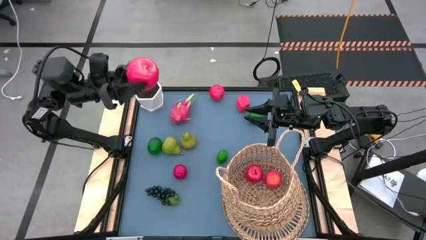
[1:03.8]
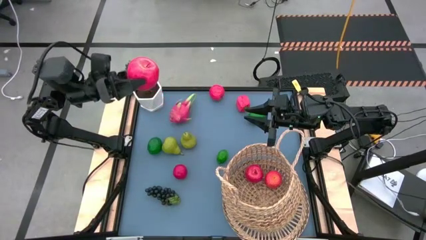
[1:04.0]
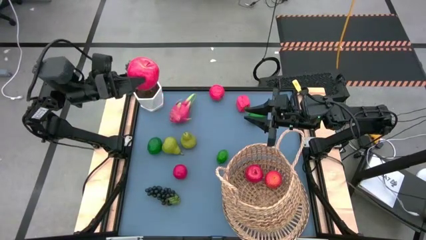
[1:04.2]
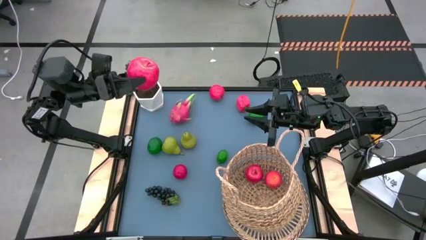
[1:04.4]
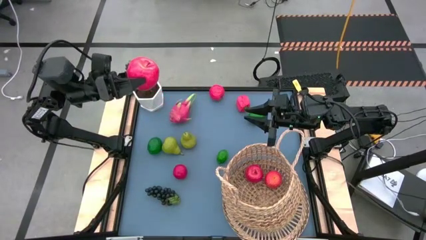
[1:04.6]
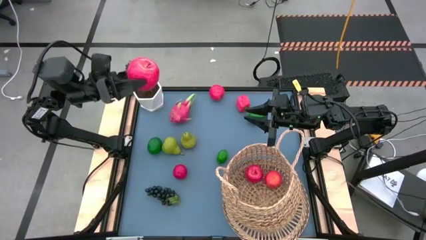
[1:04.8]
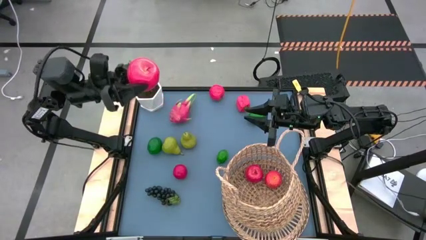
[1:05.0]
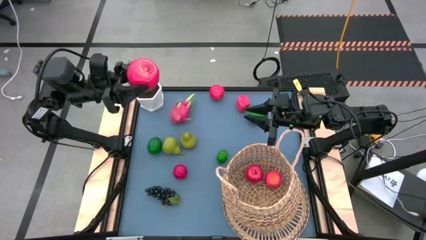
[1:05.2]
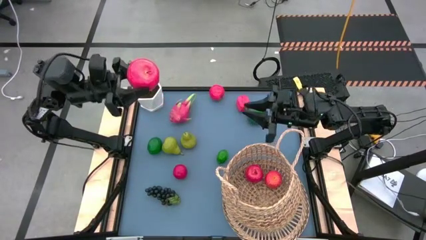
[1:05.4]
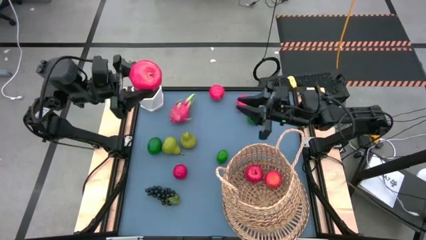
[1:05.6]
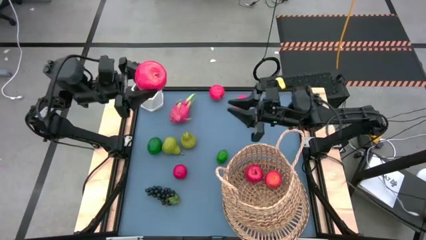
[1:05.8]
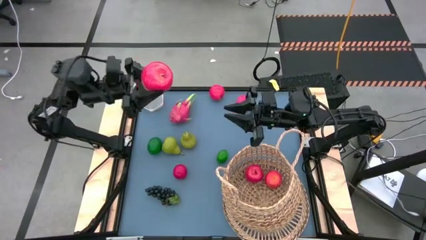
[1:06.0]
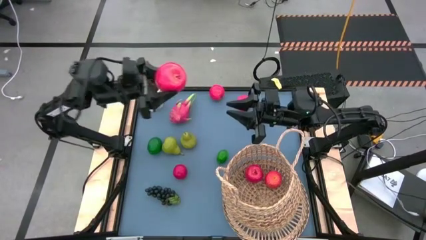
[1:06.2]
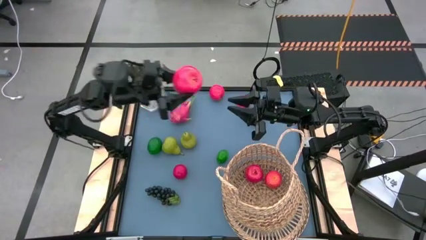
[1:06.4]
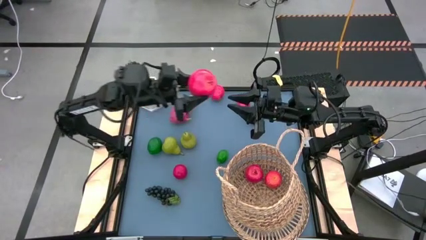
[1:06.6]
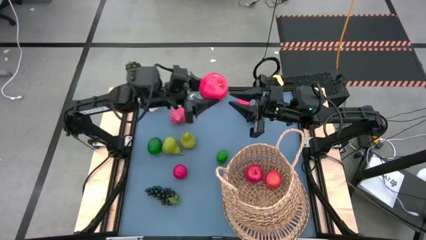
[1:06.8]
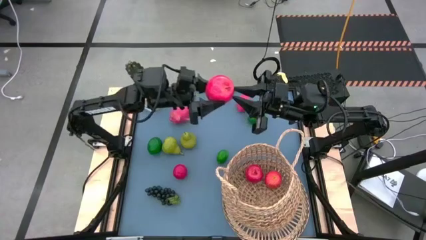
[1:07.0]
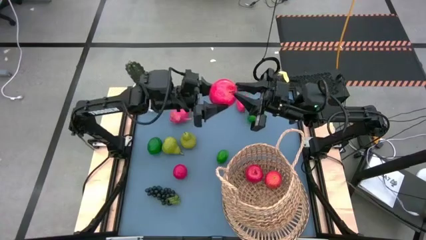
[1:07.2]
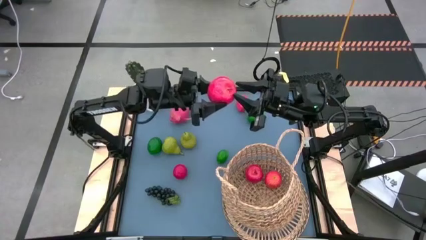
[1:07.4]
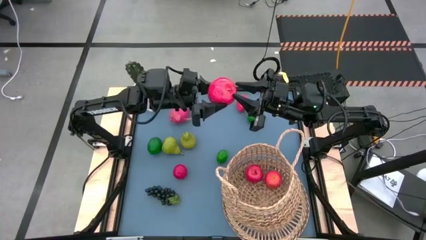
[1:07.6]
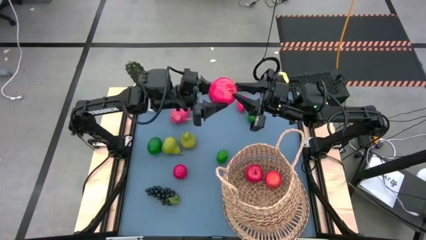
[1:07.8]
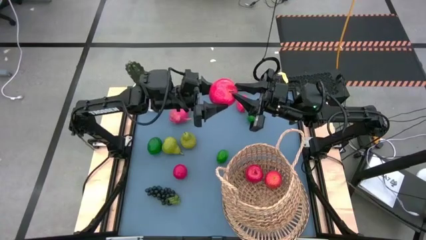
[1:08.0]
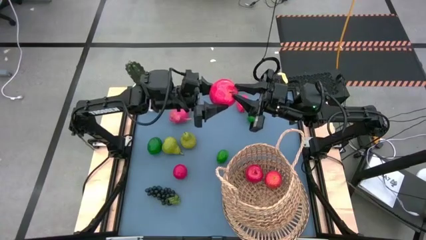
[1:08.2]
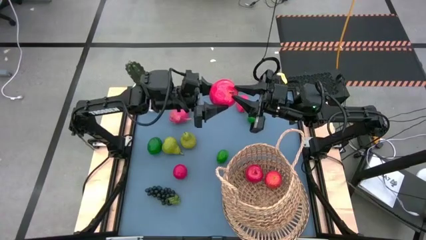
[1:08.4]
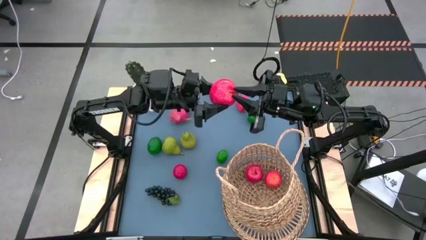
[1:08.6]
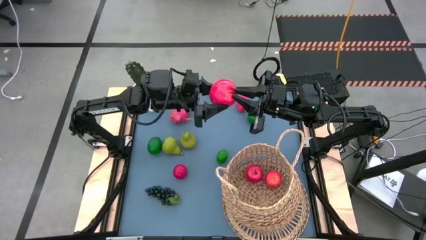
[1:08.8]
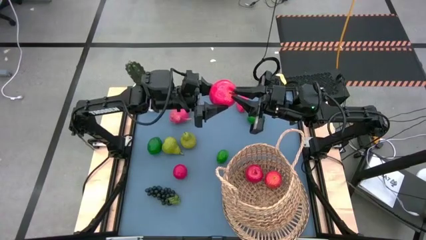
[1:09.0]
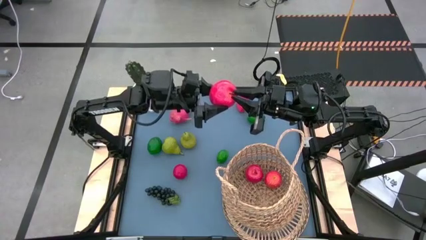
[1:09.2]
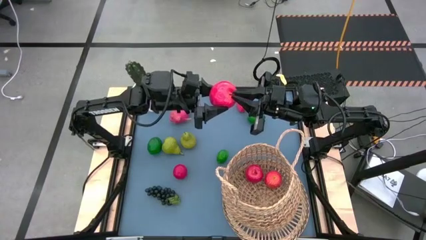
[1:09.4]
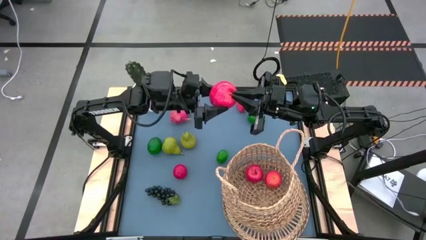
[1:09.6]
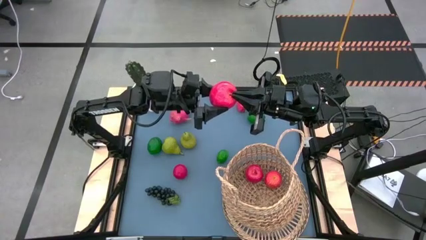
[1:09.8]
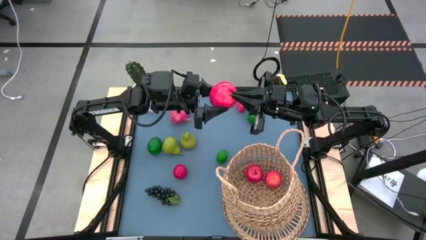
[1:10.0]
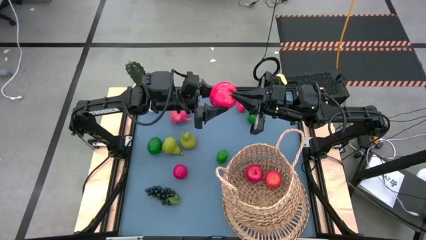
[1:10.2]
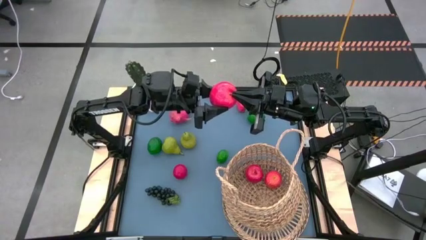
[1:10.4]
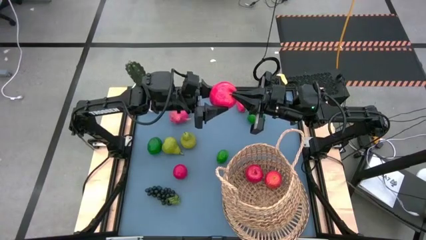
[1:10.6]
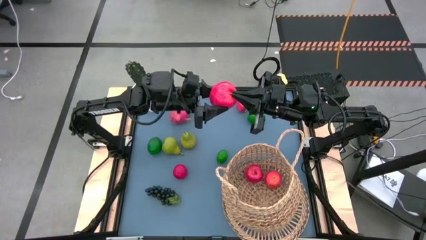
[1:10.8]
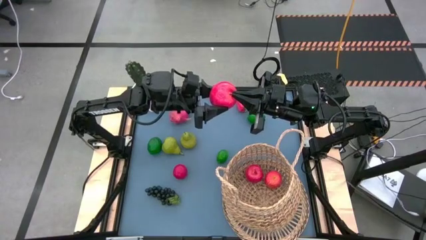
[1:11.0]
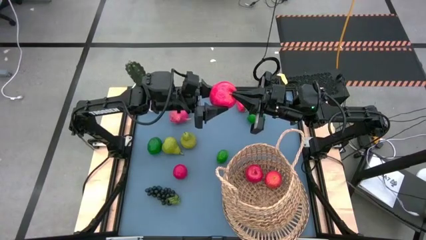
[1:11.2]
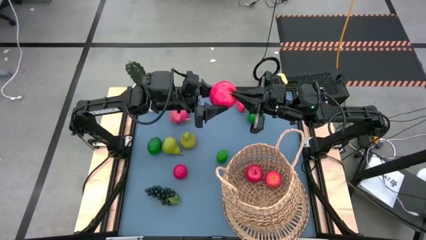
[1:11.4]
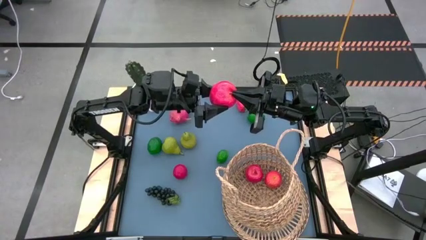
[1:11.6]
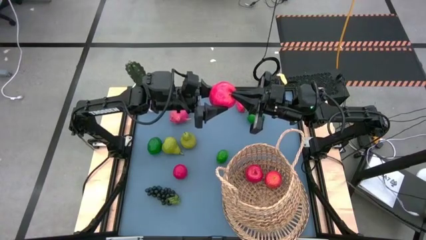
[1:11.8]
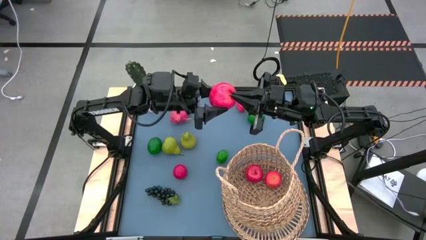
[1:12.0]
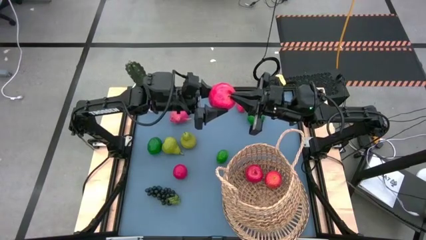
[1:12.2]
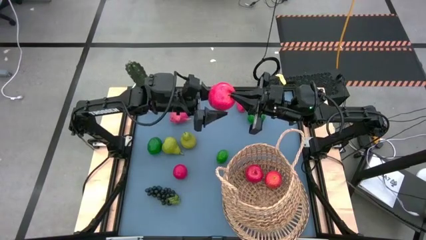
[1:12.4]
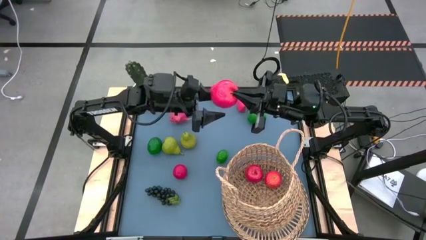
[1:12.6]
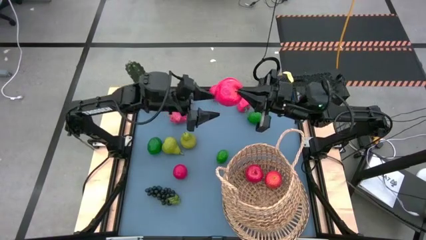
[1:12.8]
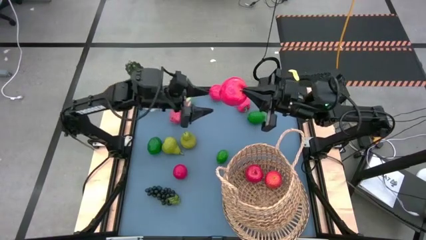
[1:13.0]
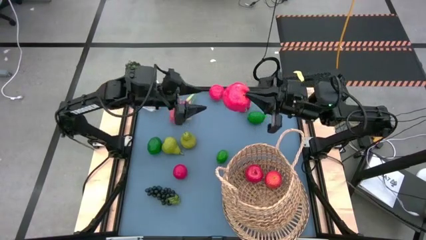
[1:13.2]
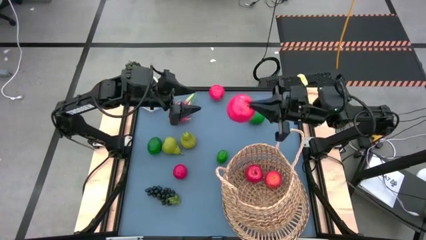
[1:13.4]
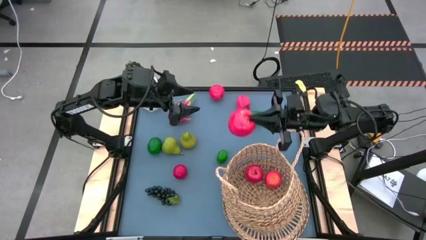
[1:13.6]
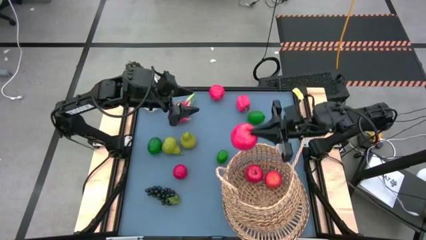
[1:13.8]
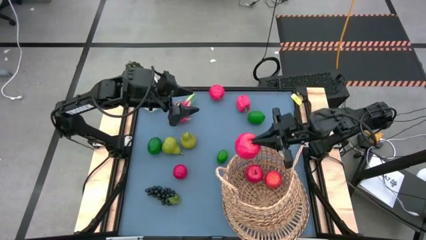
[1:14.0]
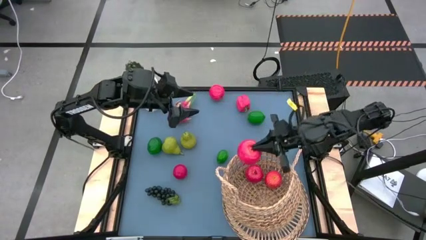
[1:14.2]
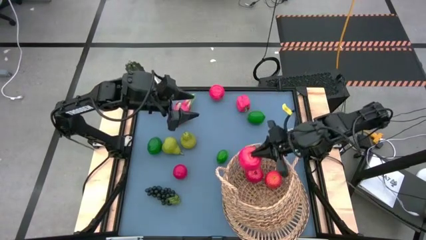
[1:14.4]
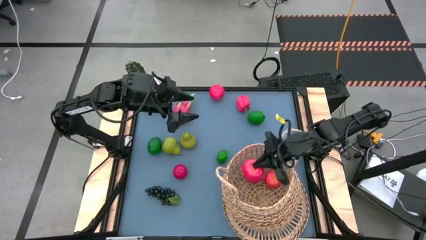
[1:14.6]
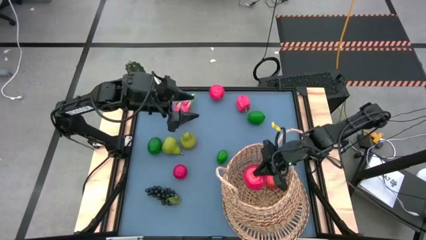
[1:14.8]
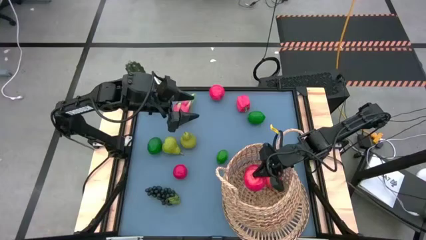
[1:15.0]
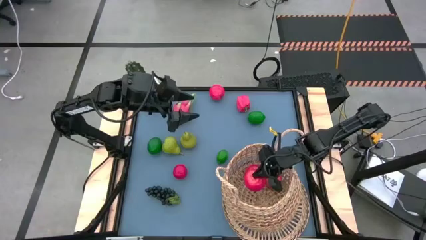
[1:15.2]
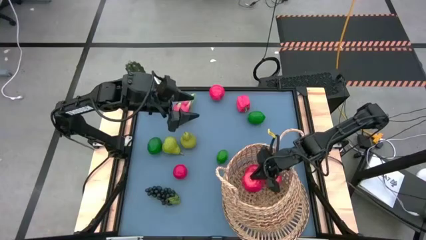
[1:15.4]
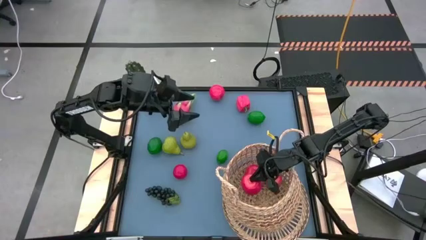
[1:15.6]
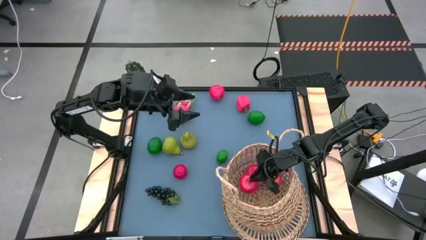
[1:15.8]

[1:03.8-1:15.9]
Task: Build produce basket
Put the red apple into the brown basket

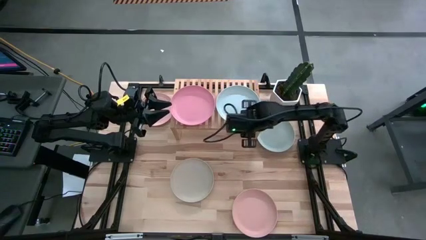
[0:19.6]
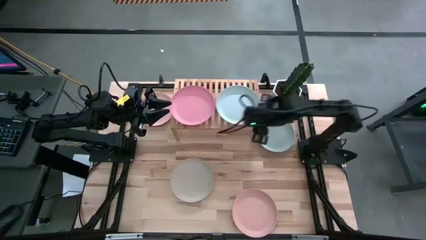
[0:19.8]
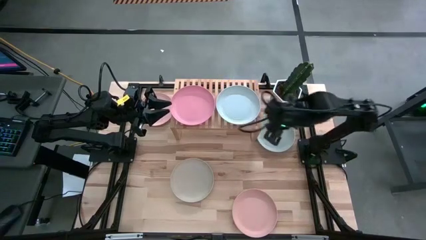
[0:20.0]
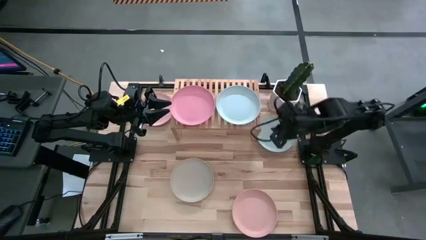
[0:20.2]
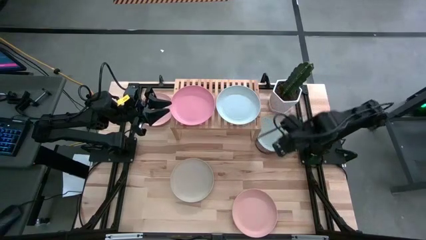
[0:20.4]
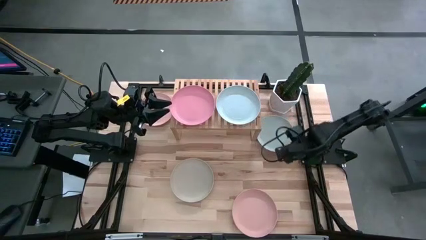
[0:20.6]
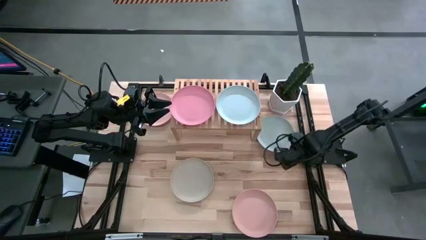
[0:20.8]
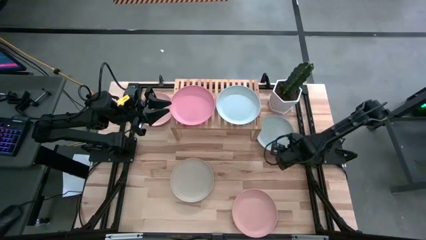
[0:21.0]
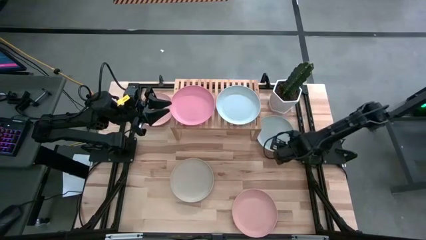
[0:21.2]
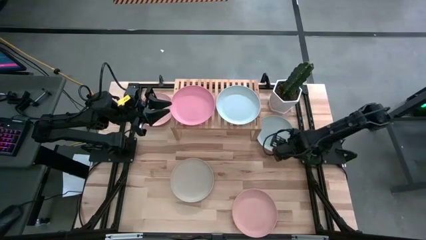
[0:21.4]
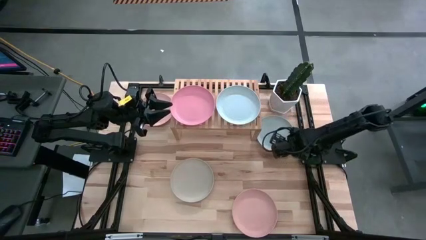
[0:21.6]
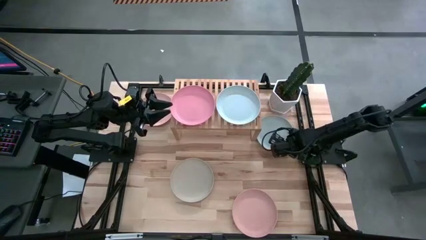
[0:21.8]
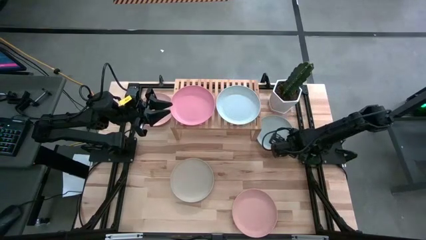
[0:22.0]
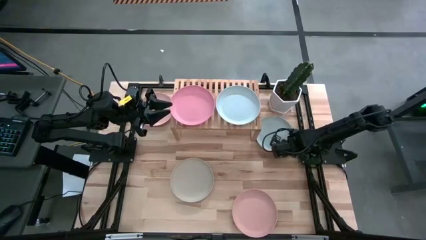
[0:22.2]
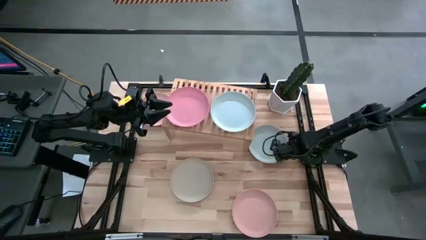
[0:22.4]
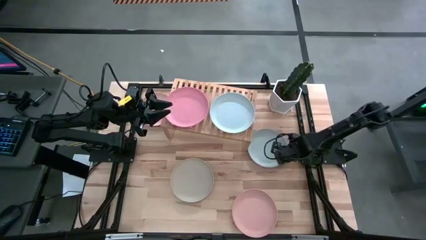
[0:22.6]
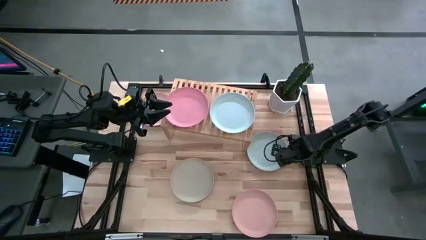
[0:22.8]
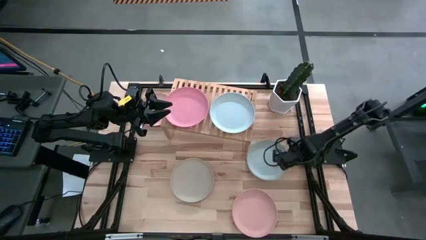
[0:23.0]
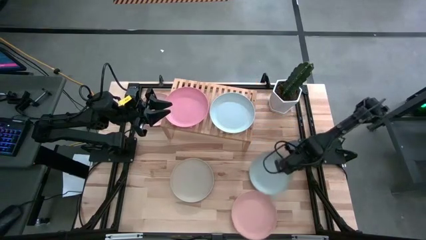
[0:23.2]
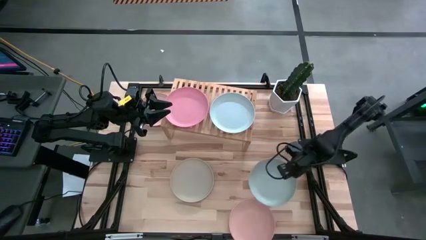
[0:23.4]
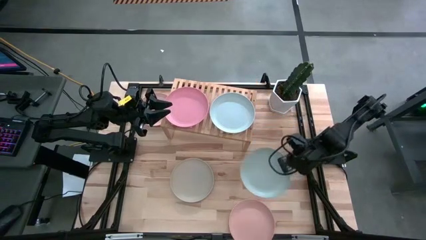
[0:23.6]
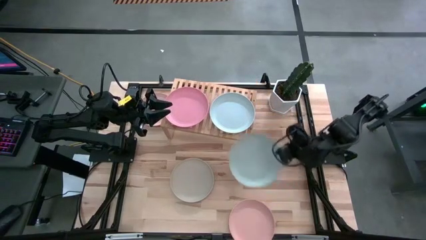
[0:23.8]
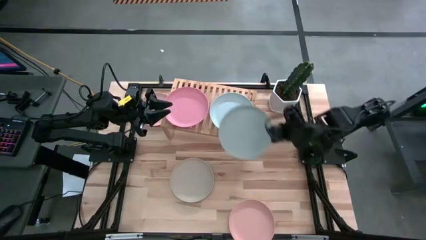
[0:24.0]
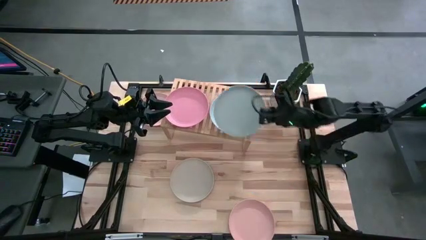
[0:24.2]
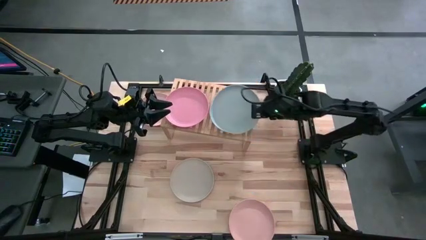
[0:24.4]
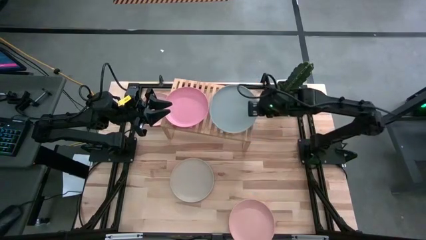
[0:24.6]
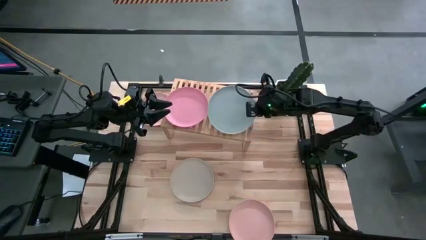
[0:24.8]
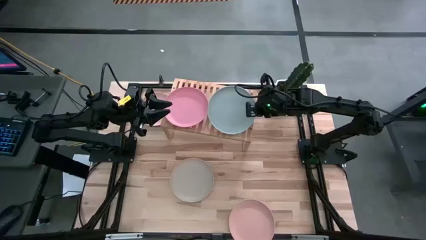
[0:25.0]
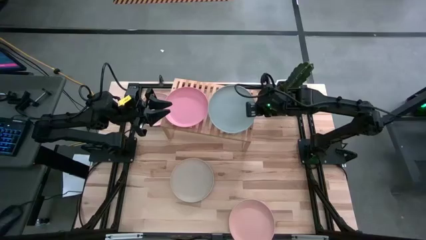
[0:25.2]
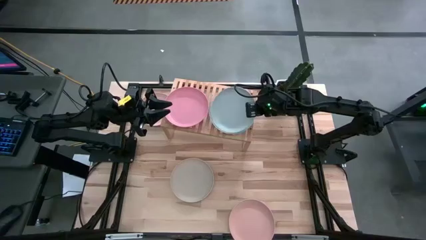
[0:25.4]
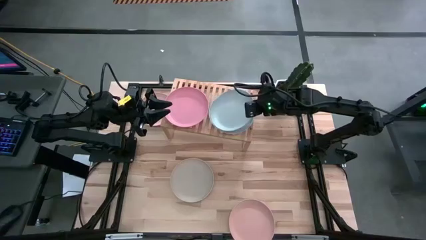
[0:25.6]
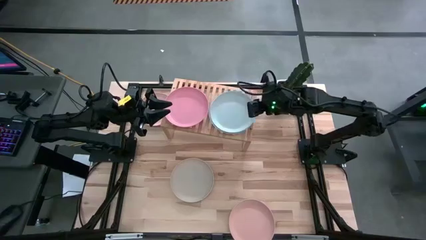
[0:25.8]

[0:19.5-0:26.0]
Task: Place and stack plates onto a shelf
Stack the blue plate on top of the other blue plate on the shelf
